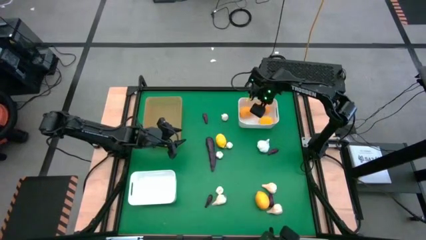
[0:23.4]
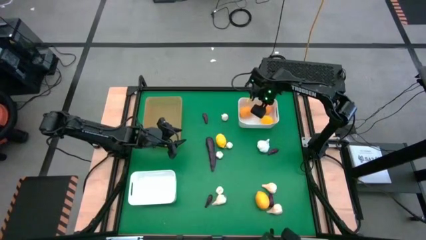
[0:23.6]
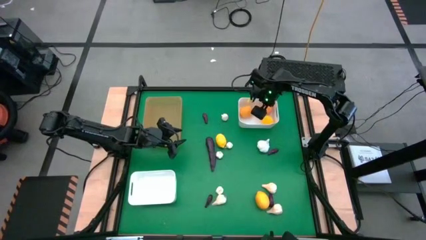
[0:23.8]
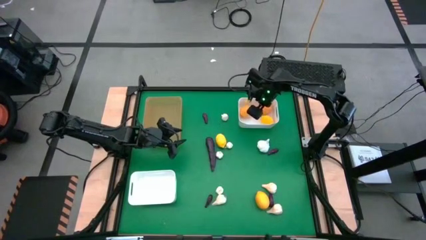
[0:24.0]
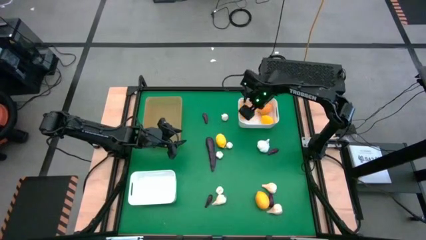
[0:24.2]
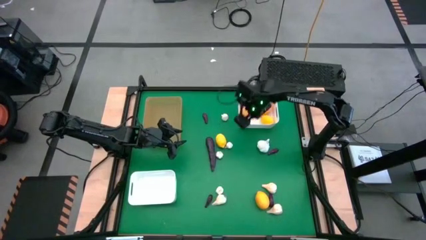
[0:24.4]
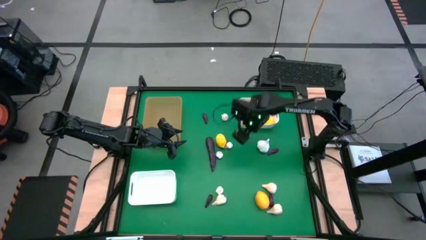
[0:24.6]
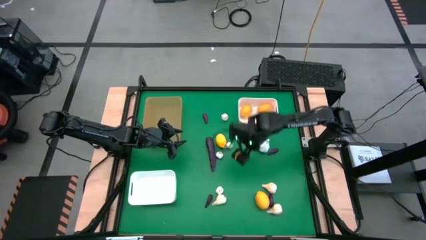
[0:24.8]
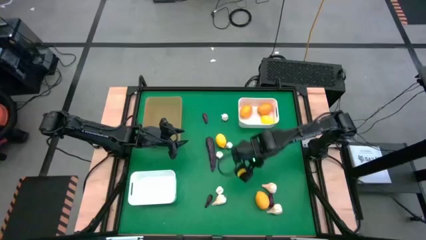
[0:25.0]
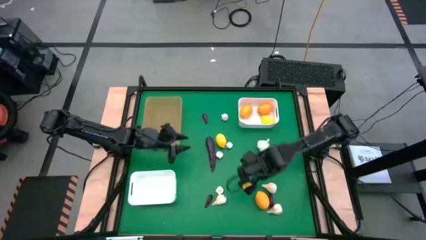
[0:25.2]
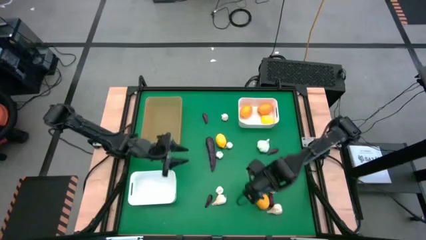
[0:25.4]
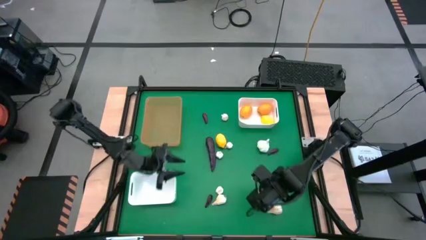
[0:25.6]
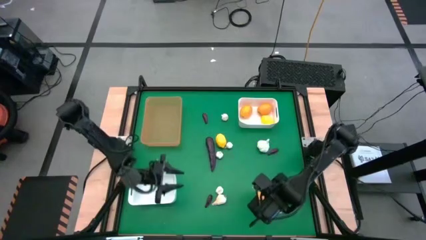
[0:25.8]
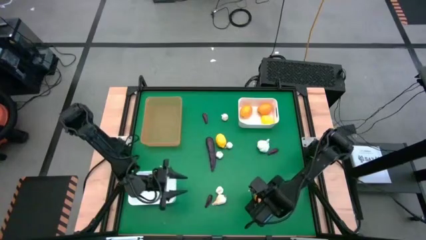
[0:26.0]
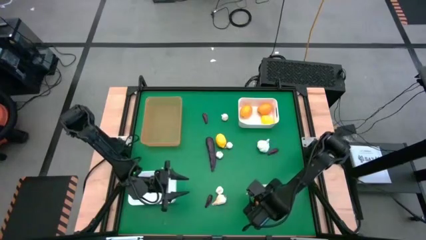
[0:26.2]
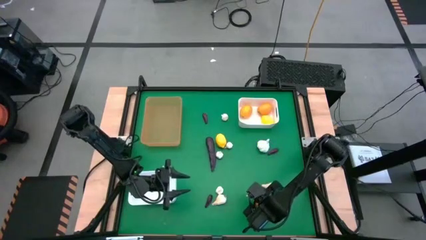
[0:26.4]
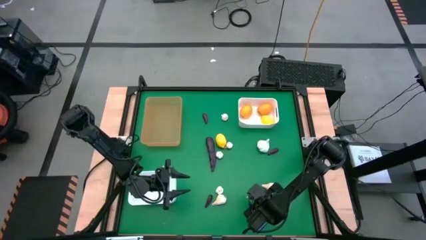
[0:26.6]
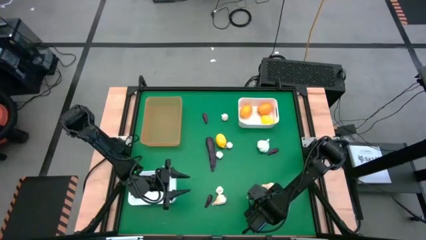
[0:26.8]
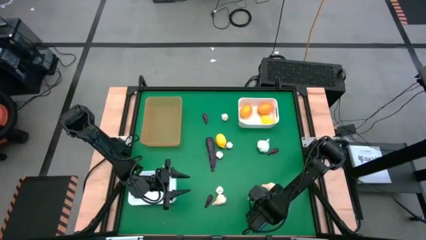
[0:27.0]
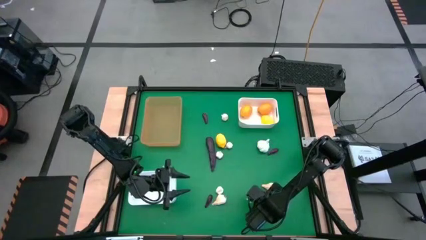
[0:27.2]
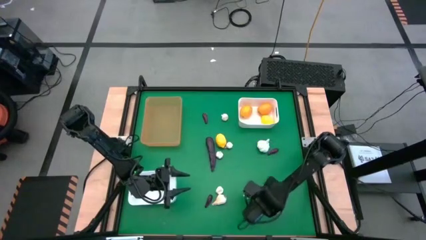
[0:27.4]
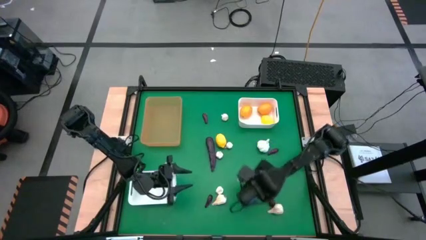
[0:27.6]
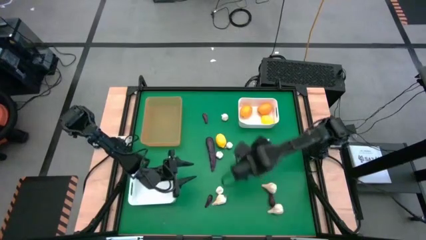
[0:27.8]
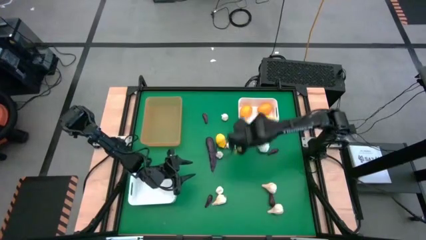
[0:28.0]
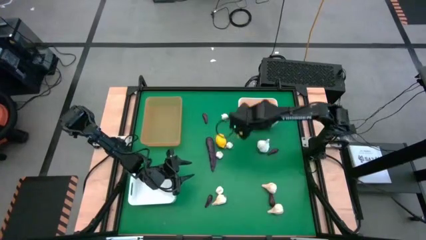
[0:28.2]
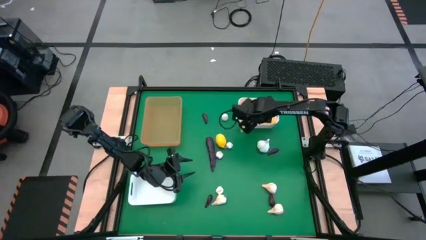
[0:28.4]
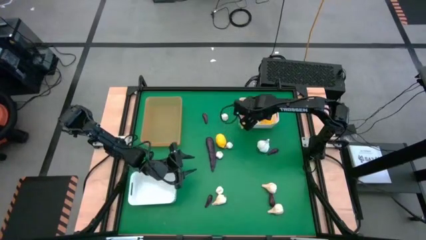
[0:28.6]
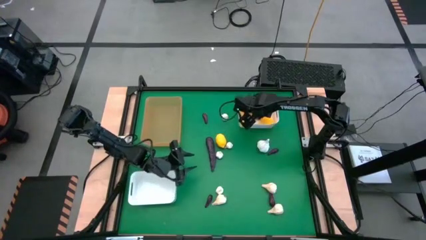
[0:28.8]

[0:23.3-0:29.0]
Task: Sort produce into baskets
Put the lemon into the top white bin

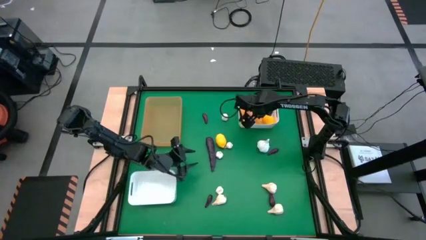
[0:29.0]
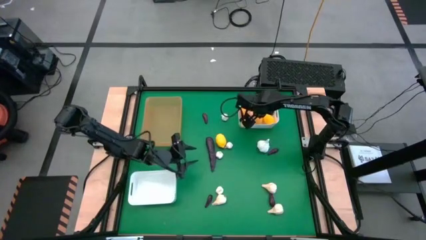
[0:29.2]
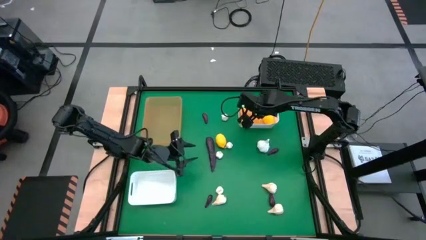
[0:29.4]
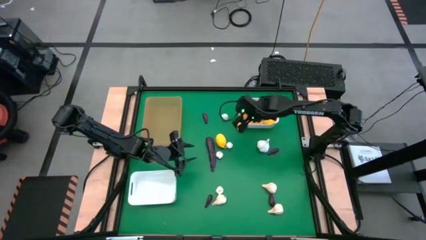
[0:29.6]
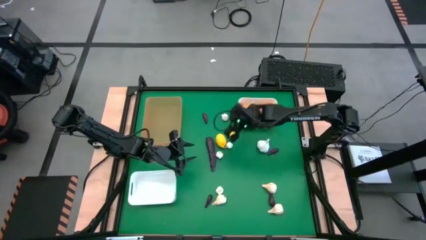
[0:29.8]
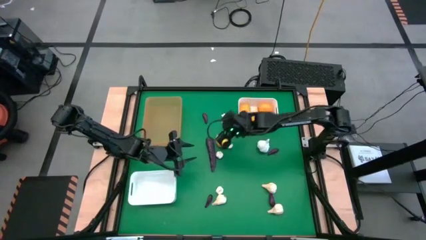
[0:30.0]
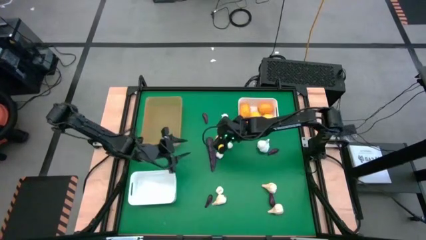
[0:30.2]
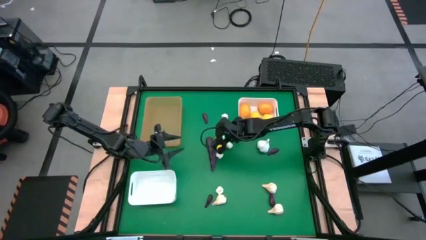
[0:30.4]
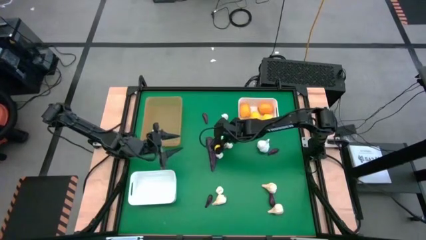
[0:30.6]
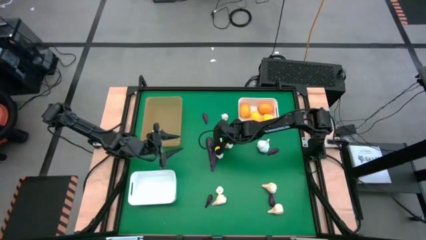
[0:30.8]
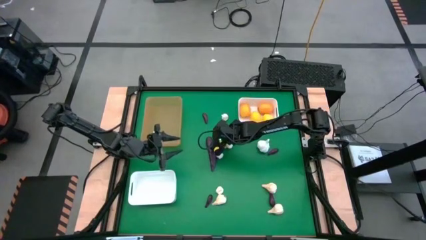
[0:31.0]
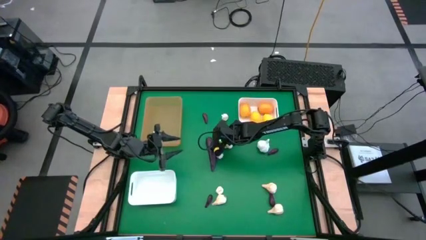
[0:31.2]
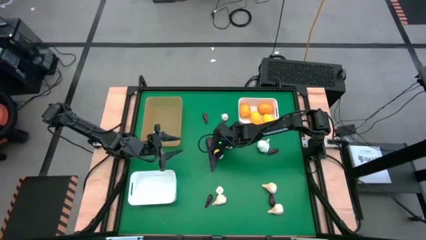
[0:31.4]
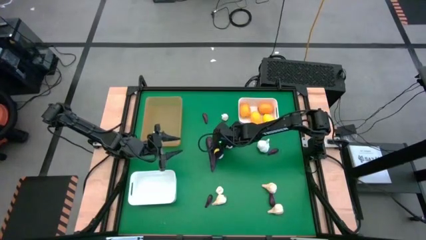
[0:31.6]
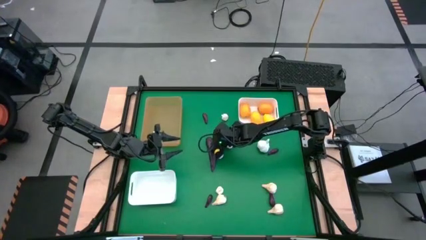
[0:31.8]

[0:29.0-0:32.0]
Put the lemon into the top white bin

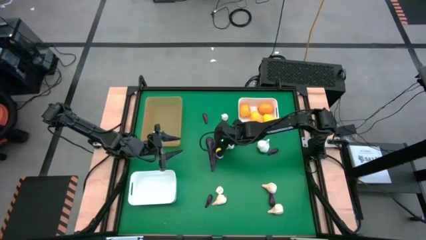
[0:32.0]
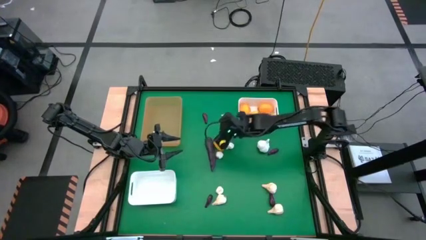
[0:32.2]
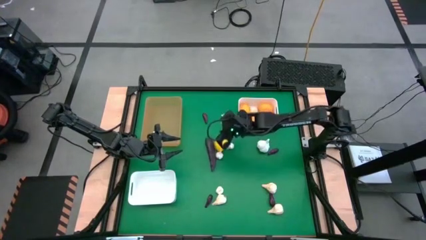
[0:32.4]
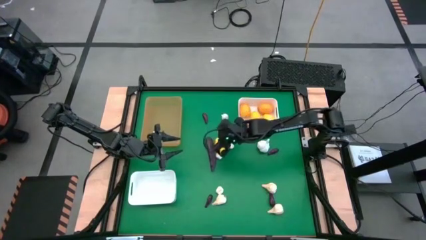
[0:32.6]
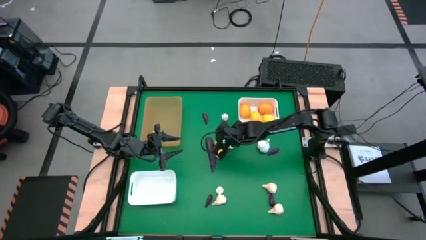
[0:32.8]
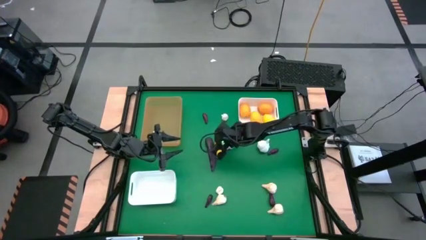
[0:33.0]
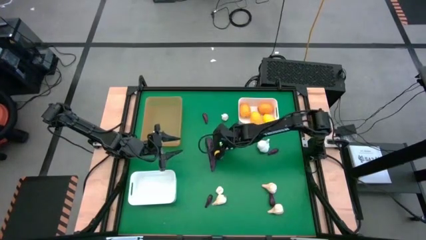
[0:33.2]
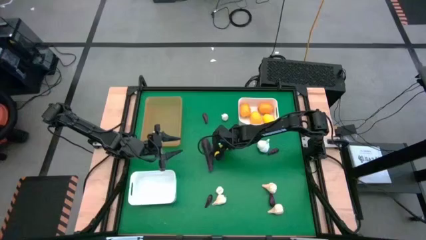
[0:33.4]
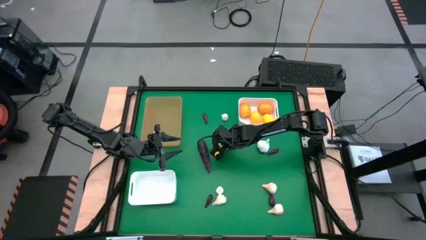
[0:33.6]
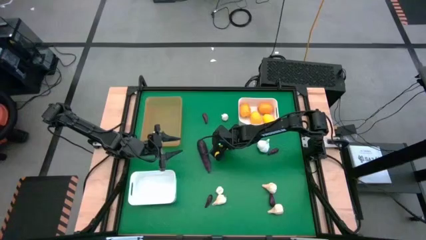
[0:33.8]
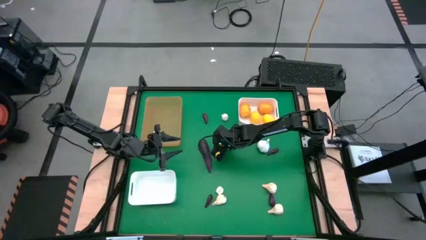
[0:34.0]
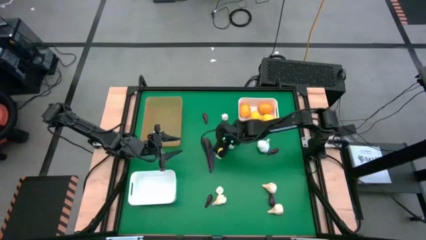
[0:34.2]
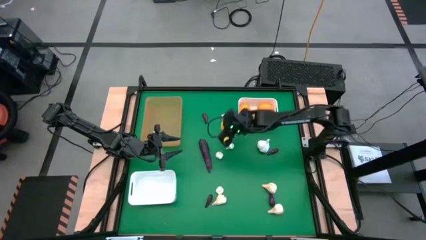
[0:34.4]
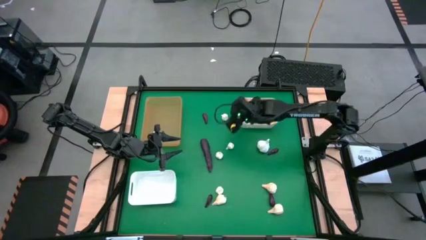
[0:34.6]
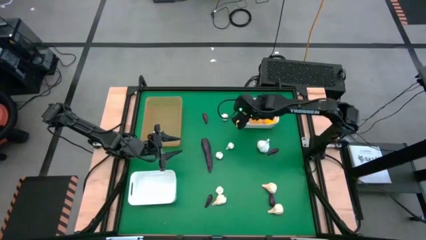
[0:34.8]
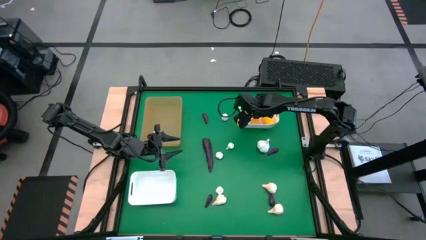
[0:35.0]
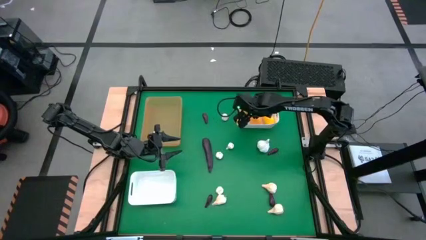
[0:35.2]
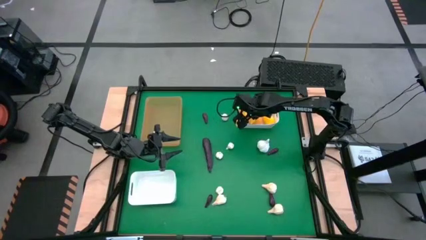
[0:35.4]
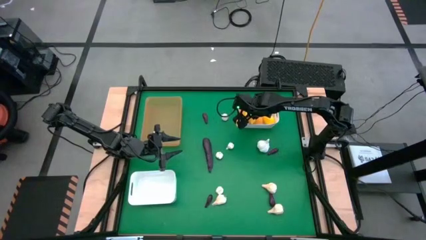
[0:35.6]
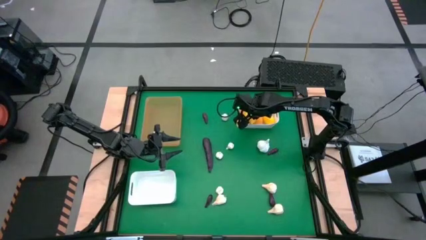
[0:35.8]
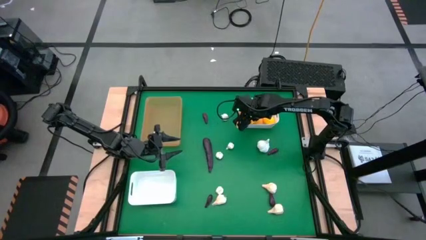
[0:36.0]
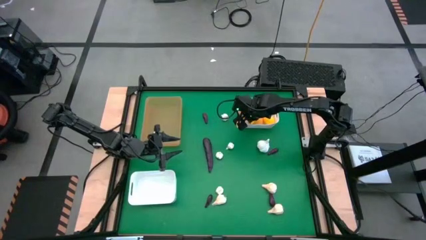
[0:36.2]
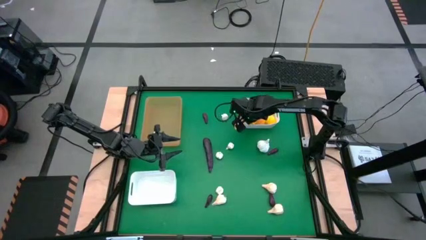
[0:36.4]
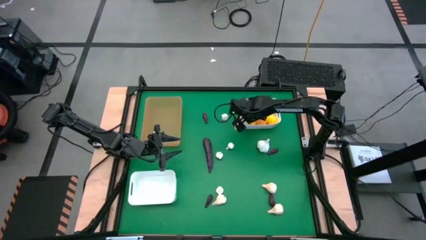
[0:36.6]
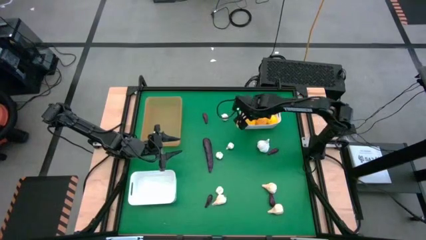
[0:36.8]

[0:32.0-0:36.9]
Put the lemon into the top white bin

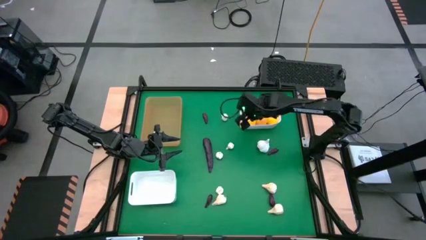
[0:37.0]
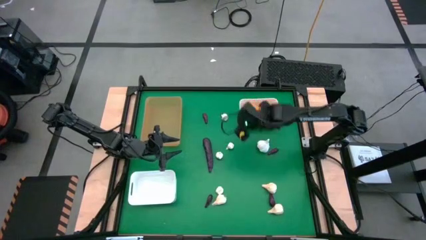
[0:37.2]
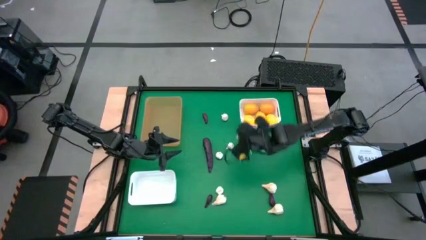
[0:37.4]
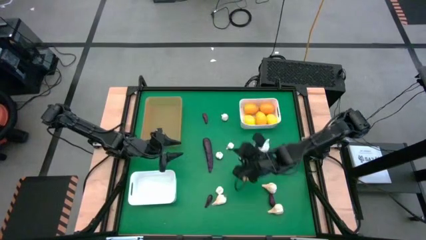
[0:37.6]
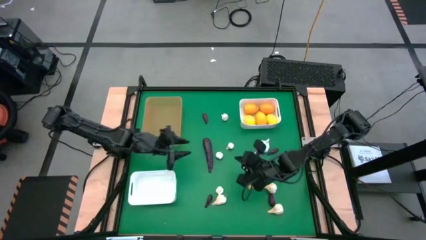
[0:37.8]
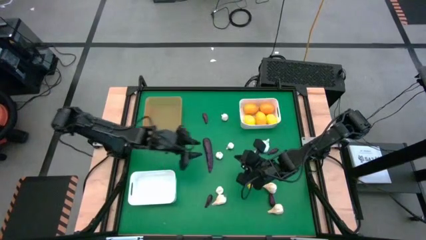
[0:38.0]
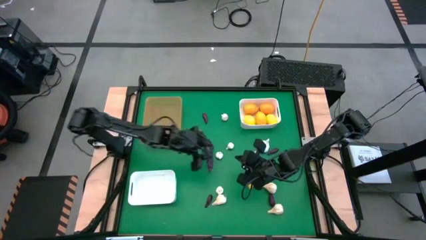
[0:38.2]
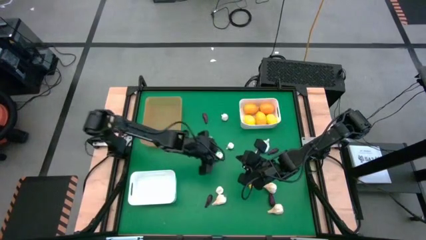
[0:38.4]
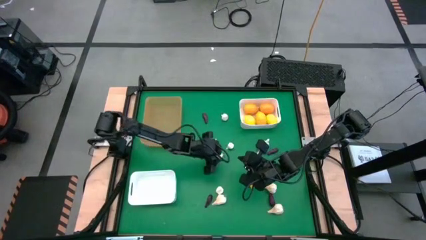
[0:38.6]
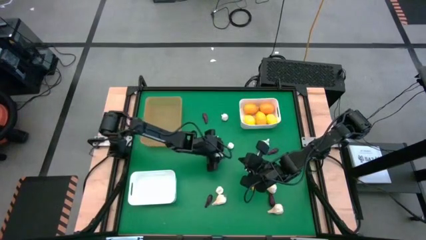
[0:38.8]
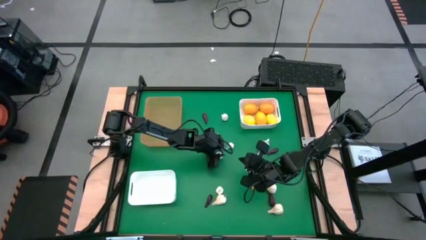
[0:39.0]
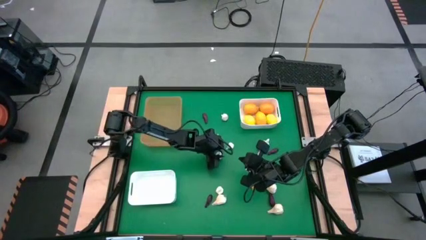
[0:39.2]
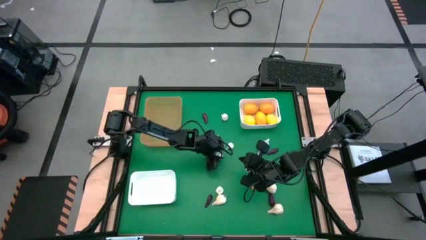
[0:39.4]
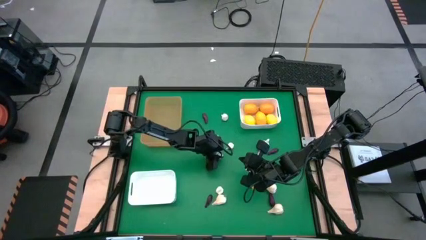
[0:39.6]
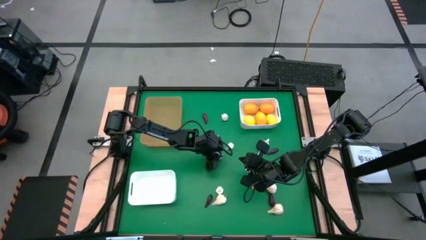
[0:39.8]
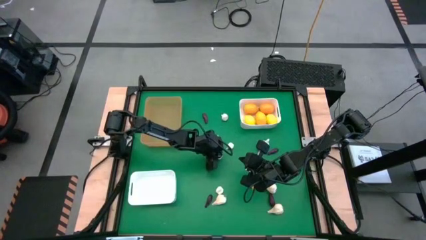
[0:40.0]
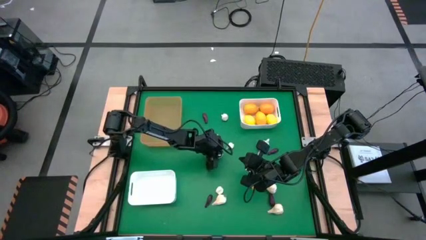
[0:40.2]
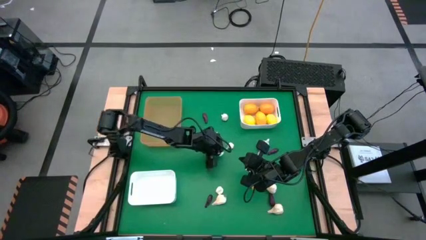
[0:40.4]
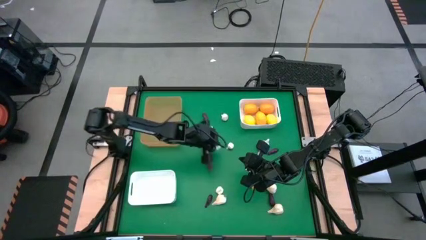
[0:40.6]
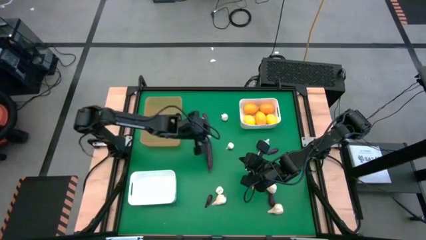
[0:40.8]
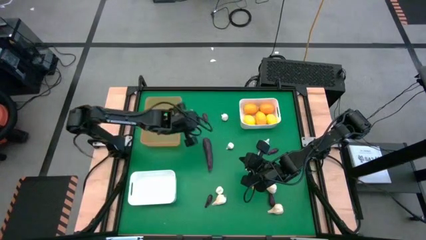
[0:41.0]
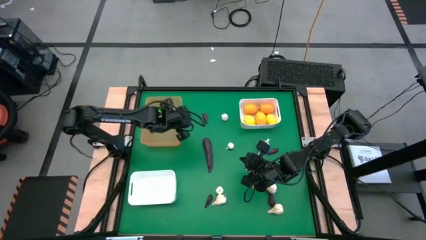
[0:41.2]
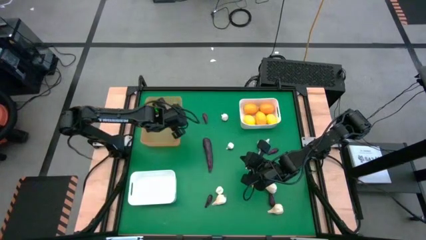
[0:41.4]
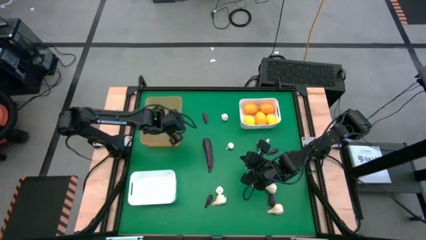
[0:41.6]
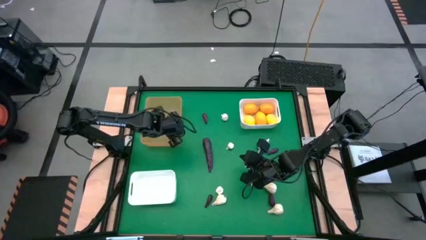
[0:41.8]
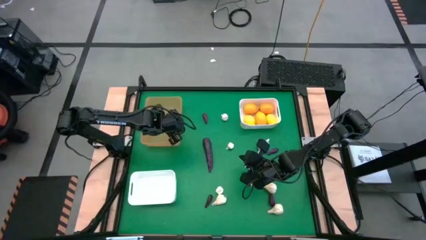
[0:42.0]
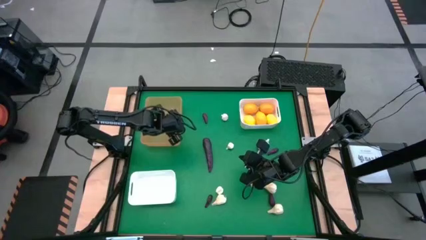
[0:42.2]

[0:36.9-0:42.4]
Put the white garlic into the orange bin
